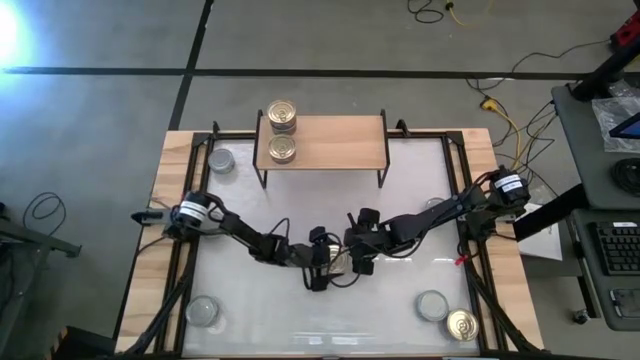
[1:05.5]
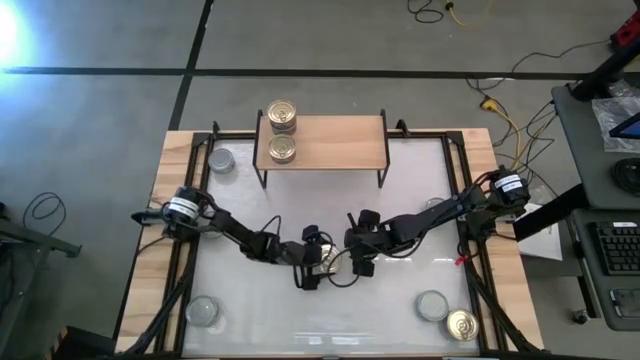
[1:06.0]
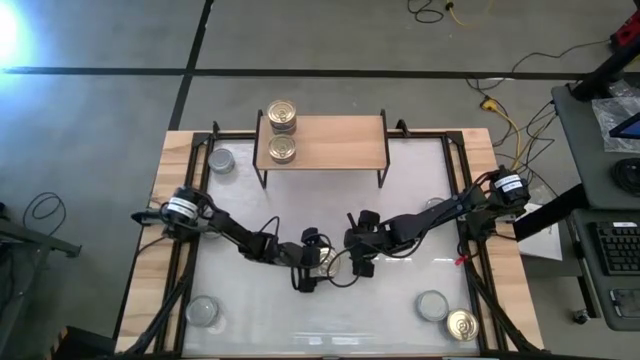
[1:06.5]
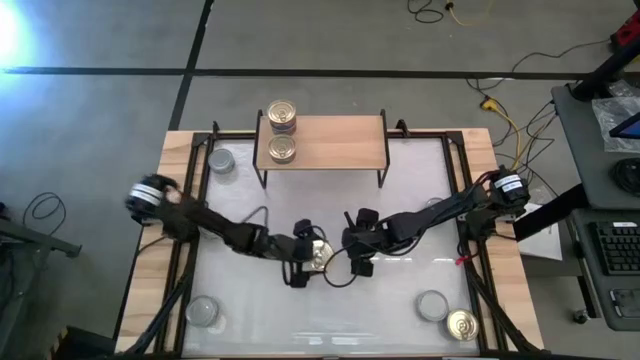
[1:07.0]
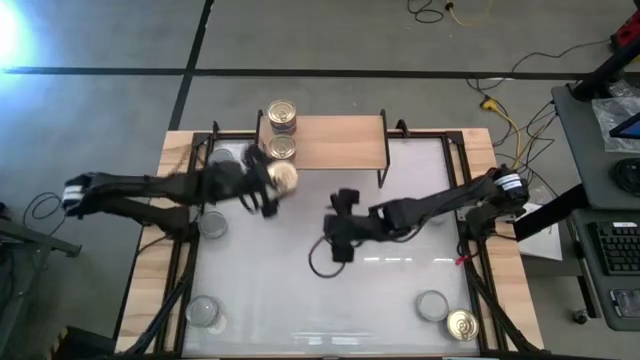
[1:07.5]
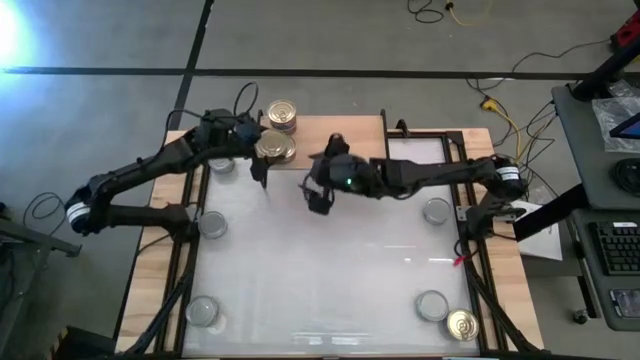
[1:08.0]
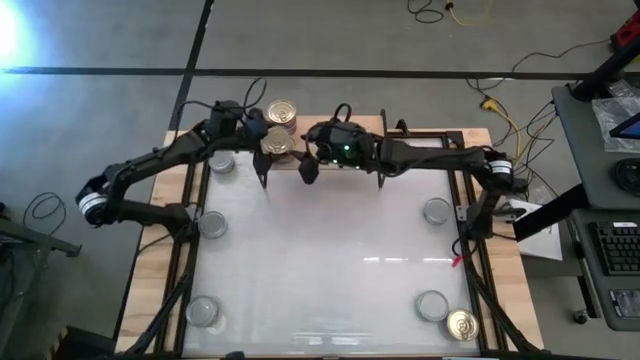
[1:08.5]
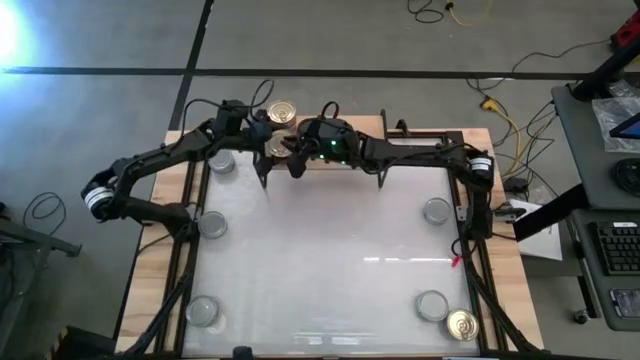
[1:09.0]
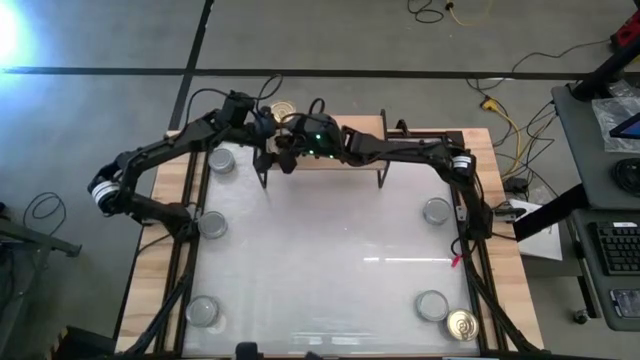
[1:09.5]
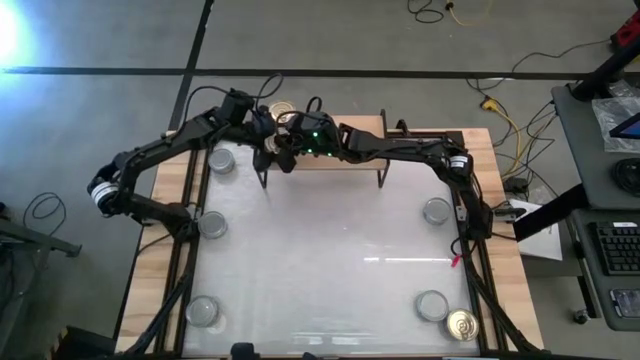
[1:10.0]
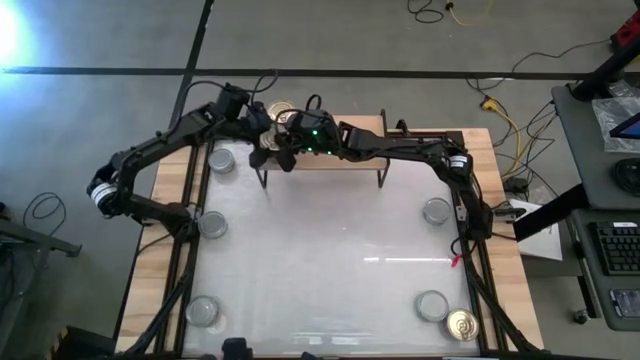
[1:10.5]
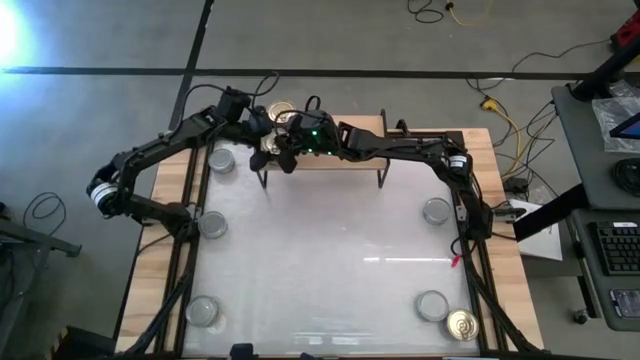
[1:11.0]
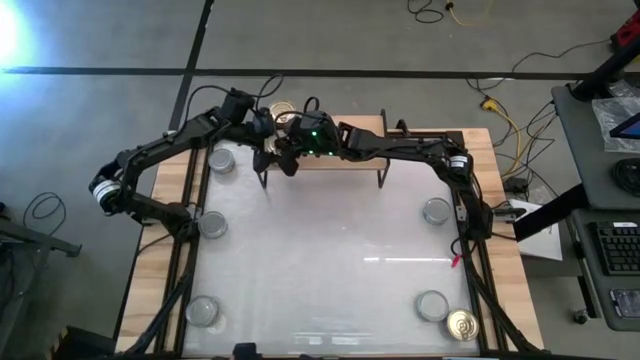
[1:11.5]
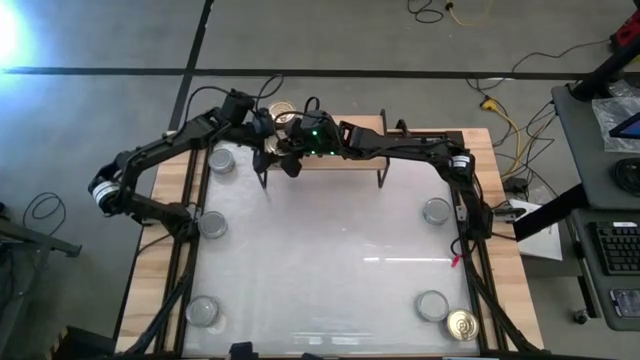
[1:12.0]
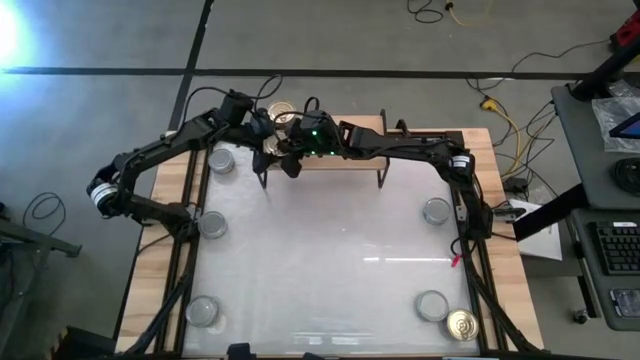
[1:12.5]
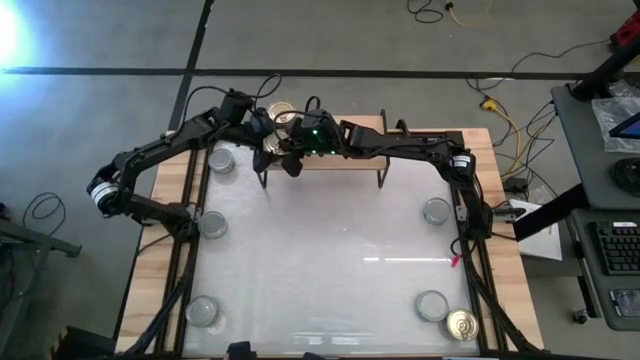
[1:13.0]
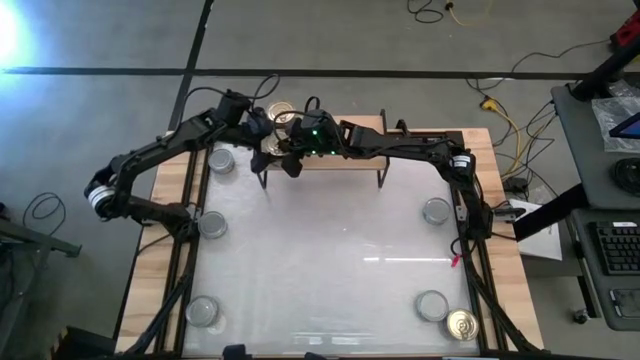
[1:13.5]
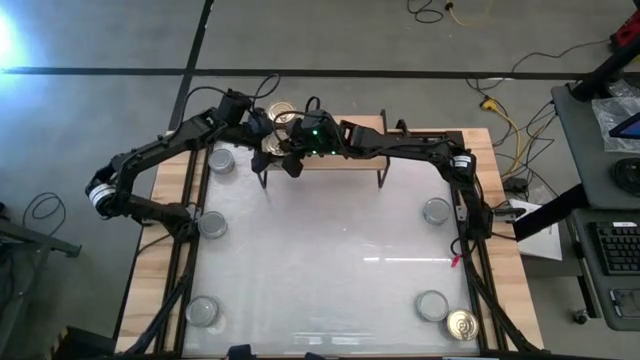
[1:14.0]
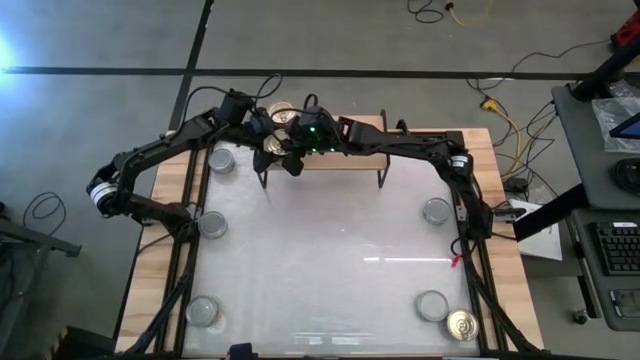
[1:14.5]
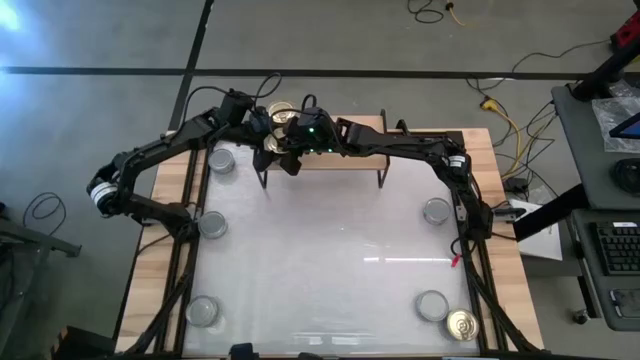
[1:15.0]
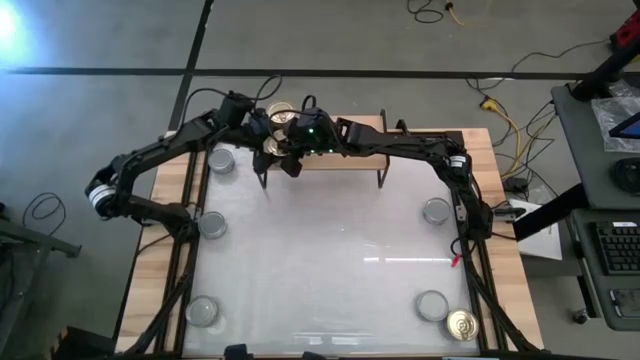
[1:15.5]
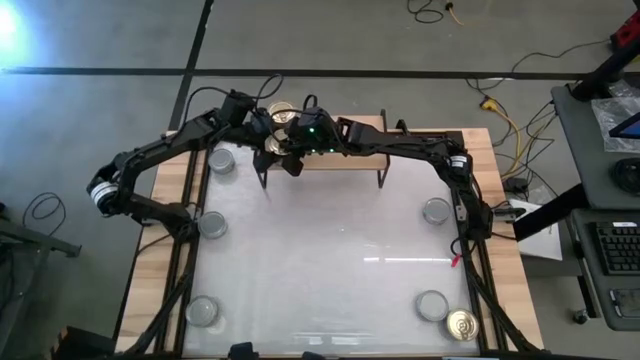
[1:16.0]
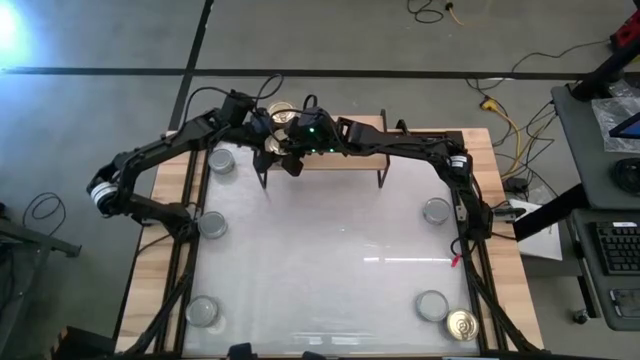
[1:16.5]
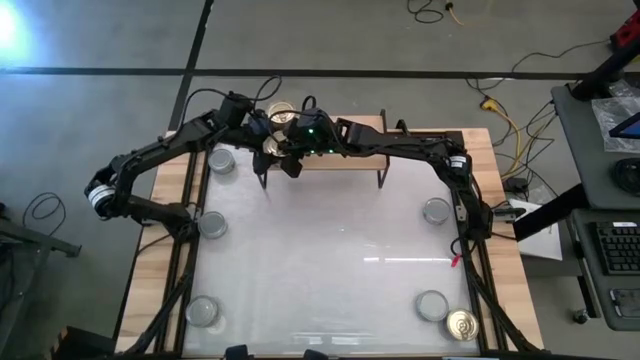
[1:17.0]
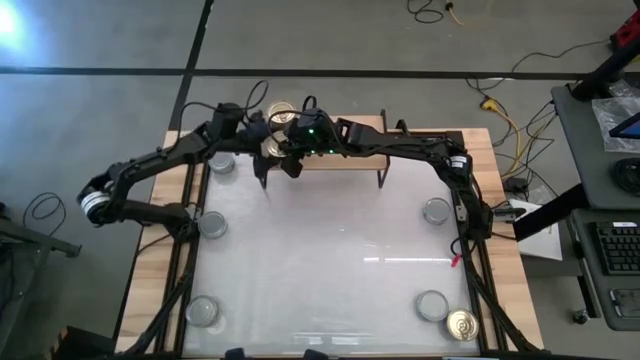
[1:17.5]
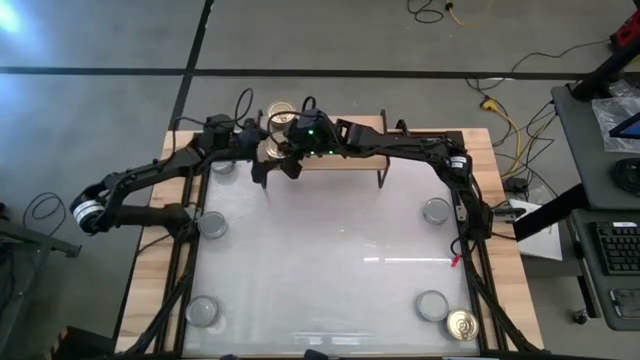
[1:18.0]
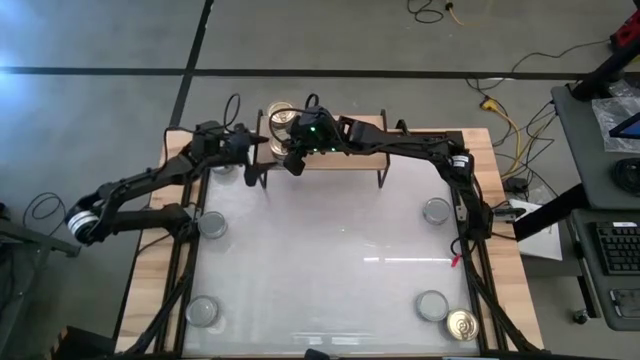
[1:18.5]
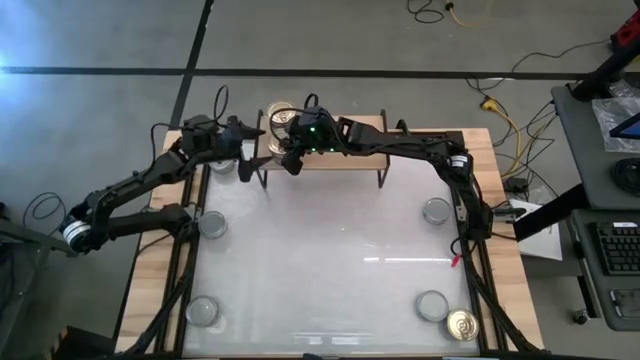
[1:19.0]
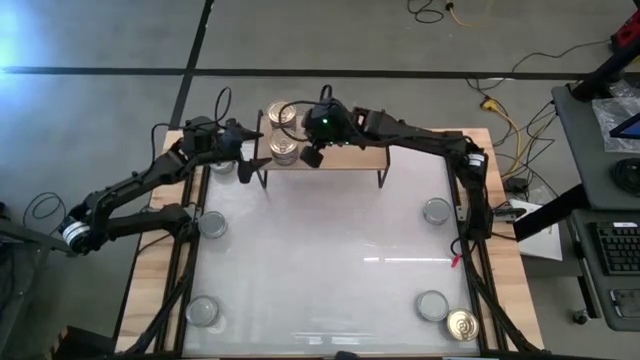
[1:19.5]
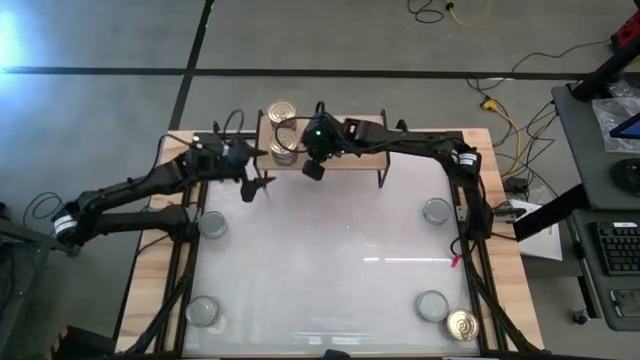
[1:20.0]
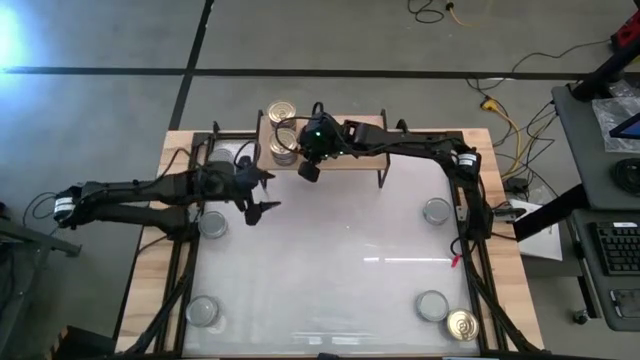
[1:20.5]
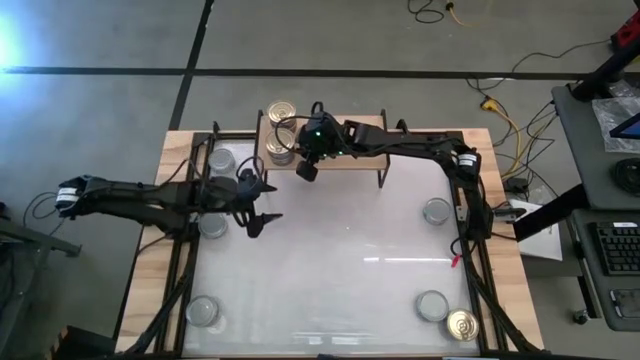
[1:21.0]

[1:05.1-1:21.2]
Task: Stack canned seafood by type on shelf
Stack the blue-pink tuna can on top of the other blue-pink tuna on the shelf

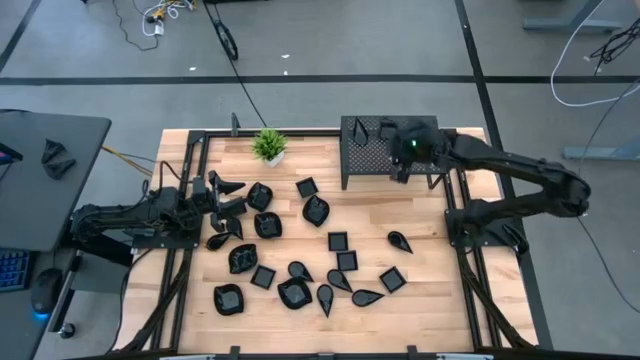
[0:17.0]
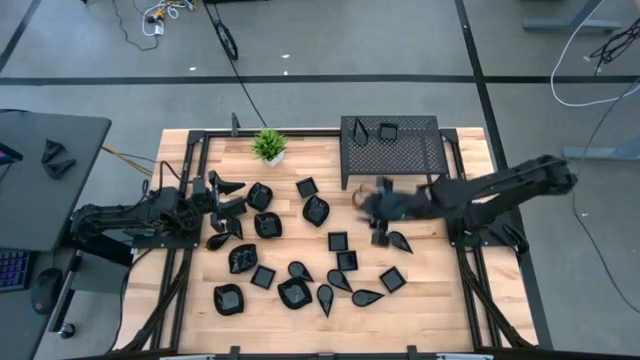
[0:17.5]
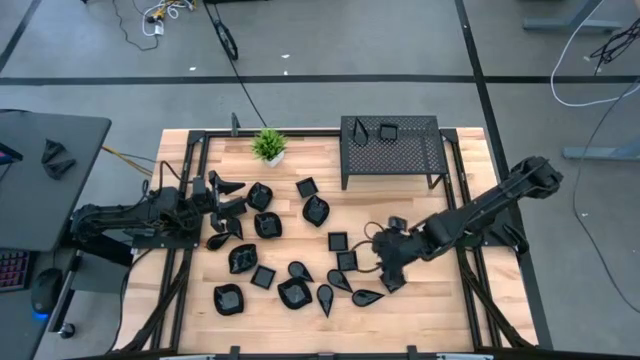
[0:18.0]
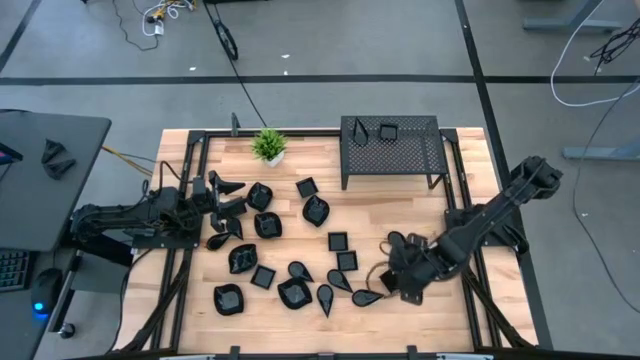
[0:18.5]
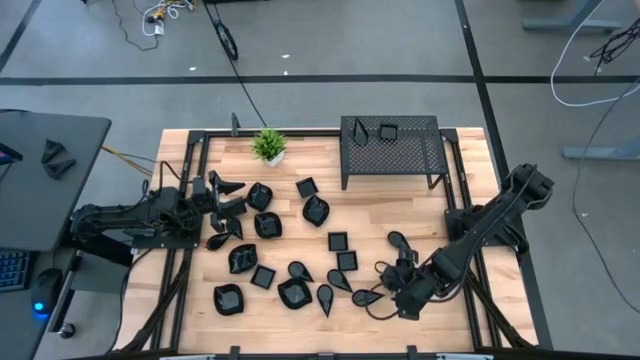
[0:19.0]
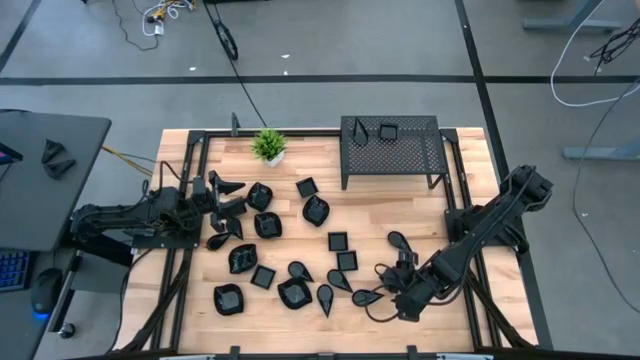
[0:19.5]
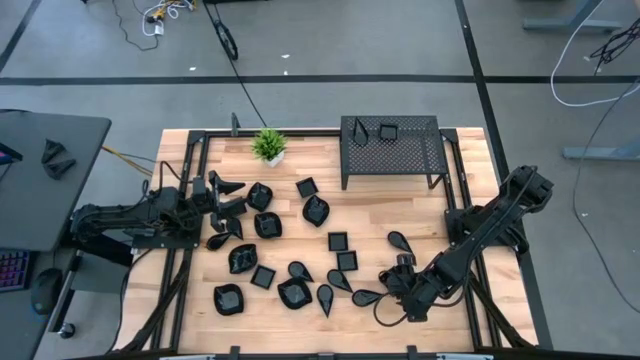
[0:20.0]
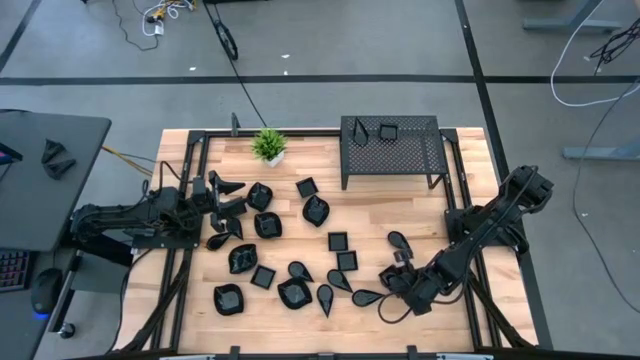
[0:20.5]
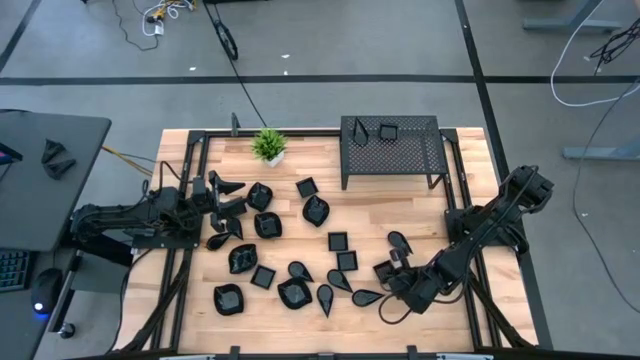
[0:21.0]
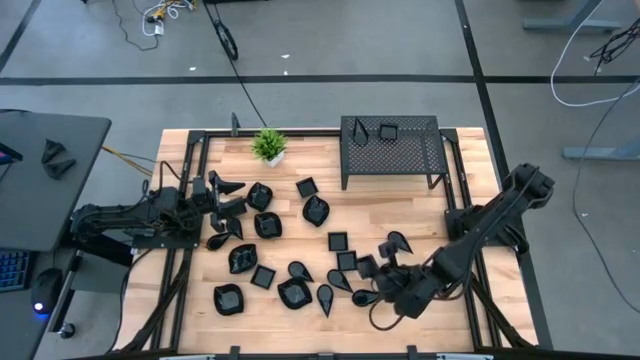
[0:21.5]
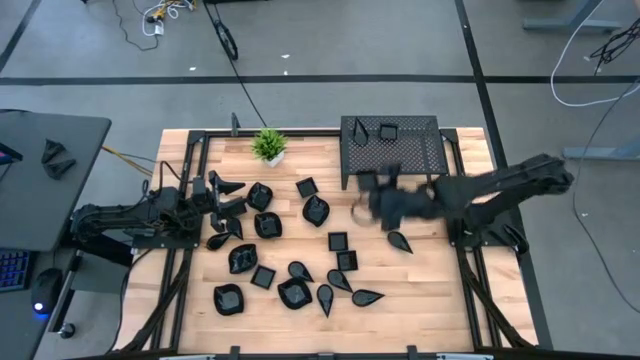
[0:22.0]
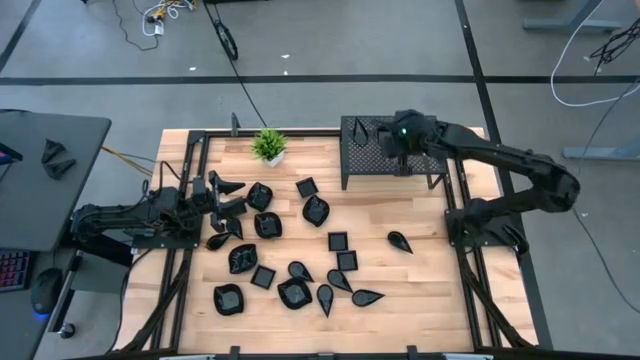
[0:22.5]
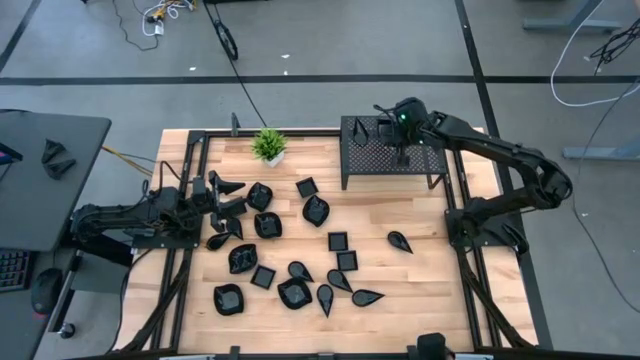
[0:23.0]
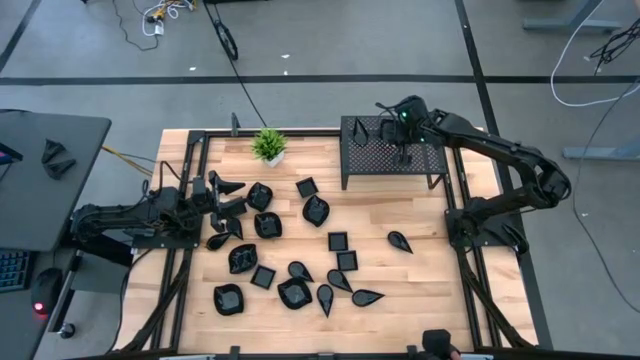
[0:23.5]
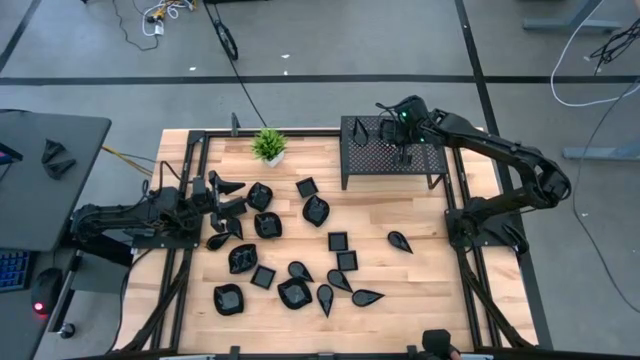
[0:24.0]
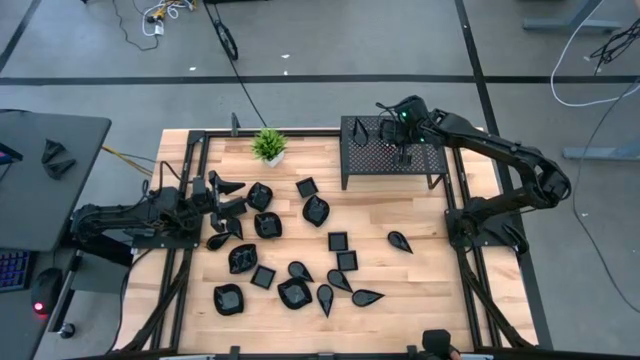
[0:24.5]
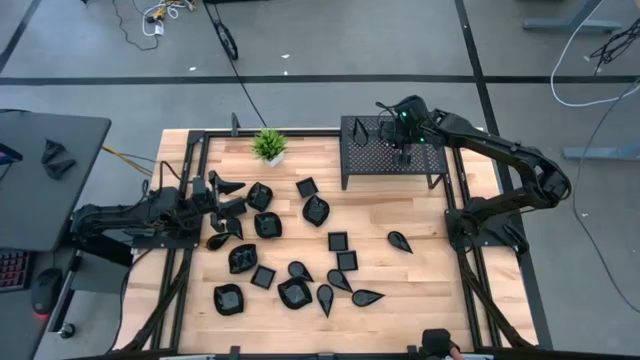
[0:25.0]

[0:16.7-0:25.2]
Task: Pick & Place Mini shaped plates
Stack the black square plate on top of the square plate on the shelf
